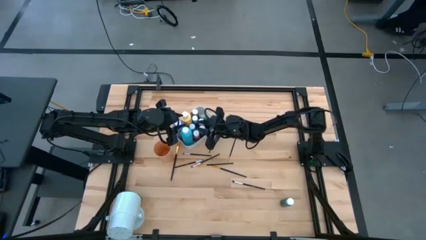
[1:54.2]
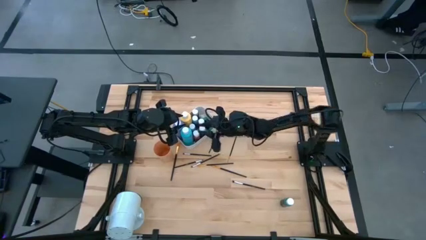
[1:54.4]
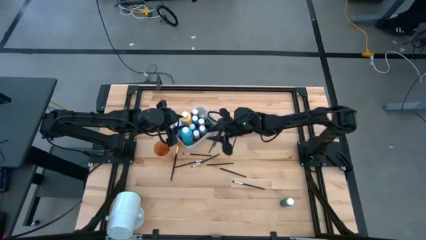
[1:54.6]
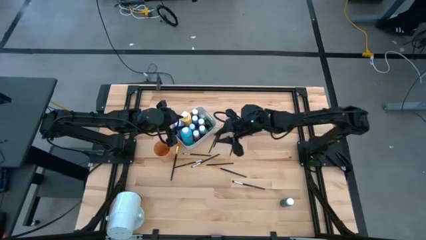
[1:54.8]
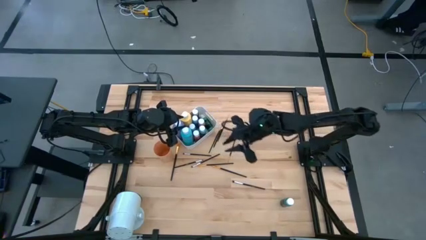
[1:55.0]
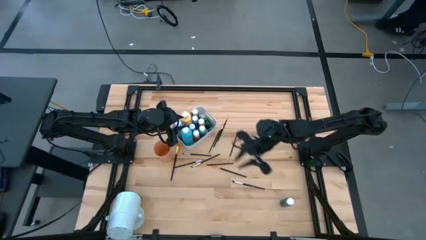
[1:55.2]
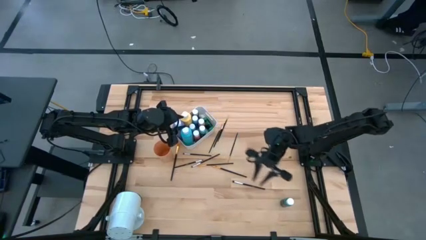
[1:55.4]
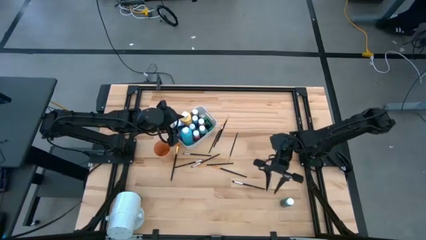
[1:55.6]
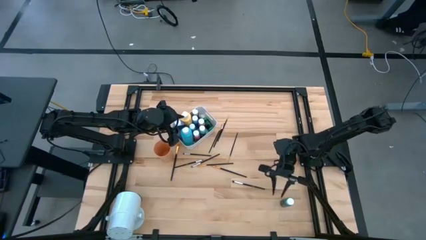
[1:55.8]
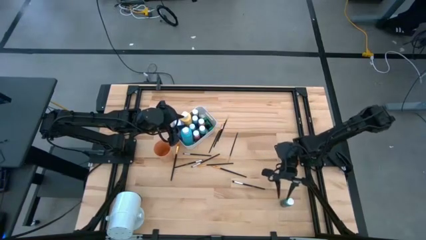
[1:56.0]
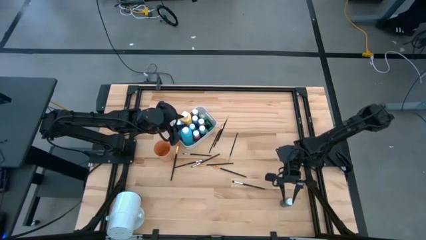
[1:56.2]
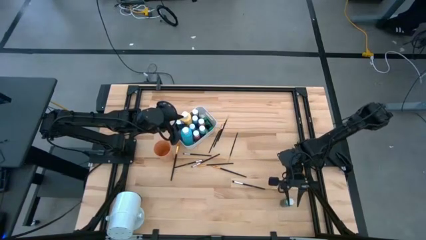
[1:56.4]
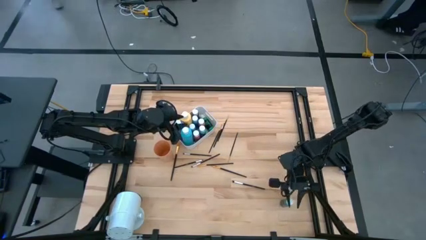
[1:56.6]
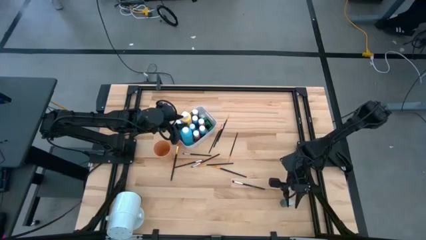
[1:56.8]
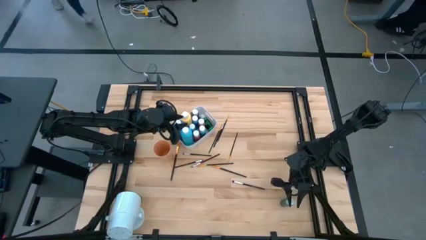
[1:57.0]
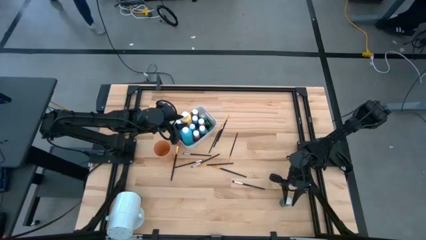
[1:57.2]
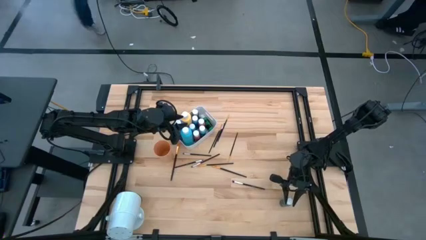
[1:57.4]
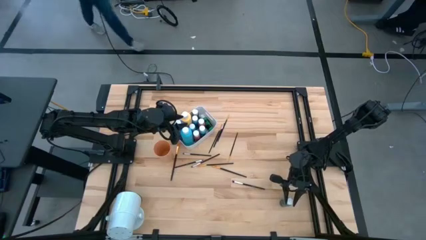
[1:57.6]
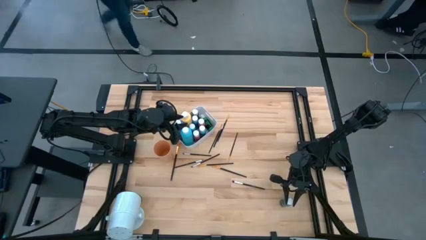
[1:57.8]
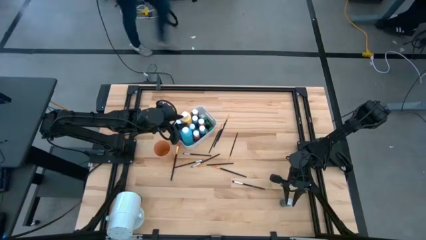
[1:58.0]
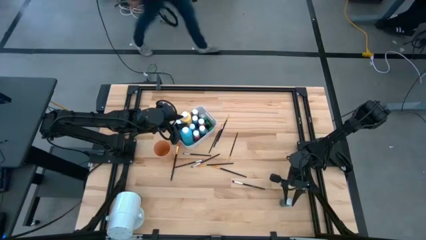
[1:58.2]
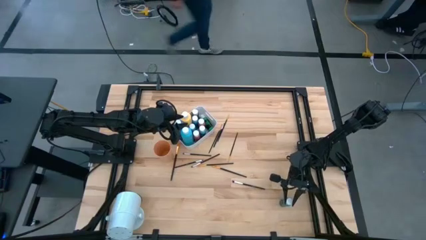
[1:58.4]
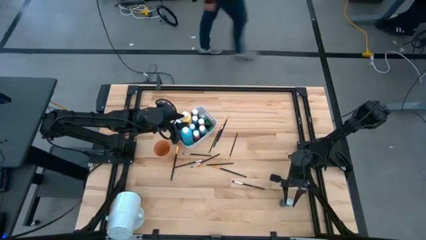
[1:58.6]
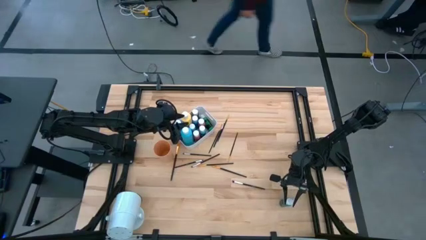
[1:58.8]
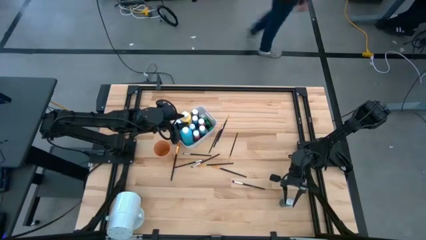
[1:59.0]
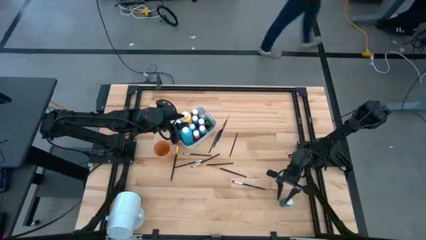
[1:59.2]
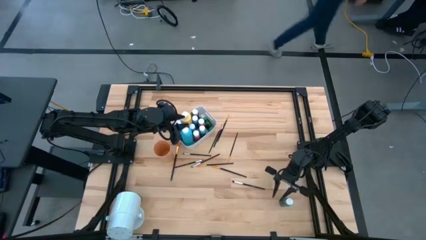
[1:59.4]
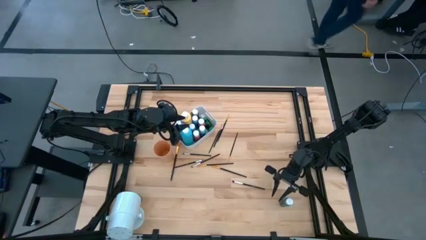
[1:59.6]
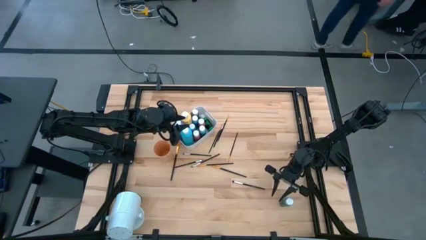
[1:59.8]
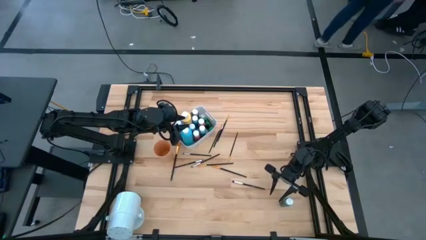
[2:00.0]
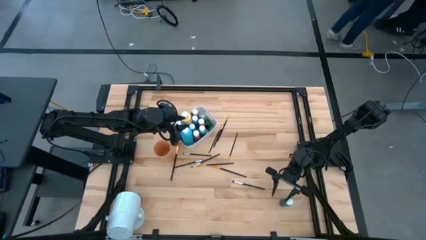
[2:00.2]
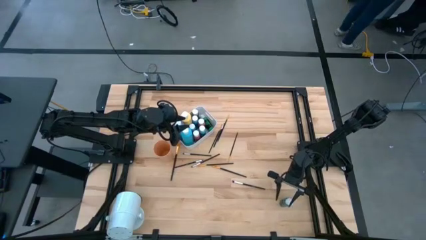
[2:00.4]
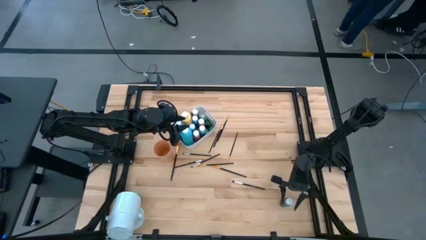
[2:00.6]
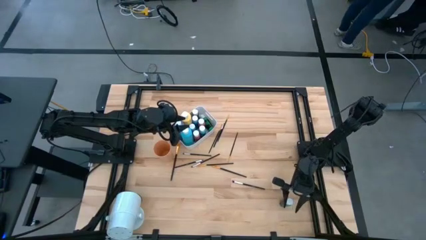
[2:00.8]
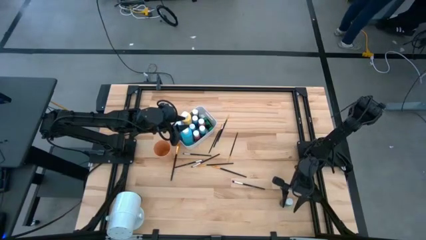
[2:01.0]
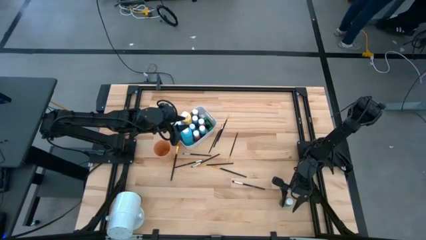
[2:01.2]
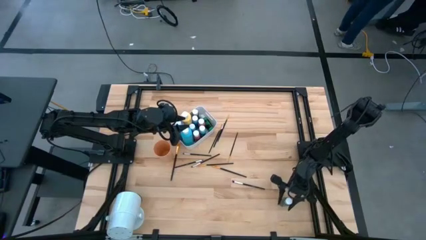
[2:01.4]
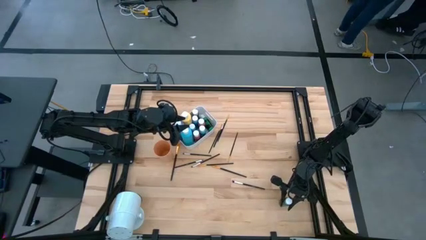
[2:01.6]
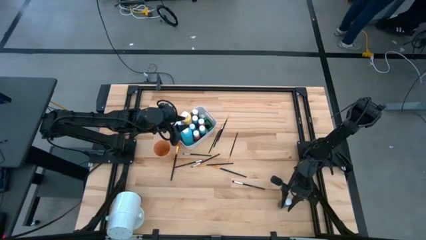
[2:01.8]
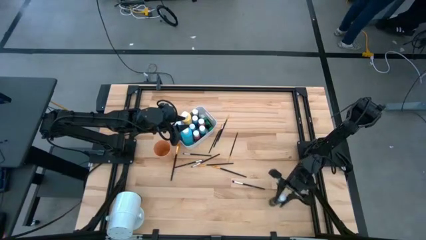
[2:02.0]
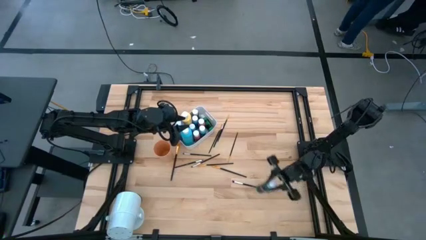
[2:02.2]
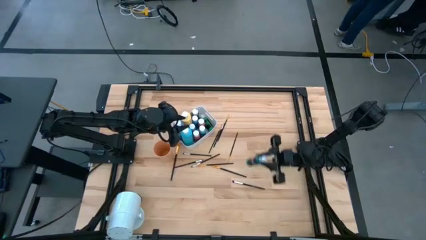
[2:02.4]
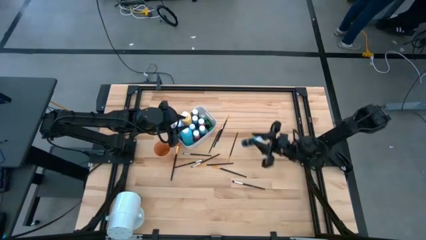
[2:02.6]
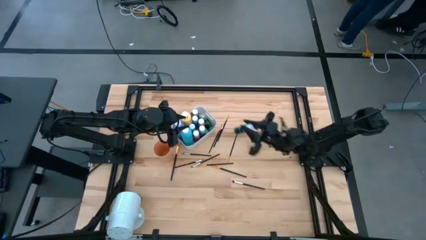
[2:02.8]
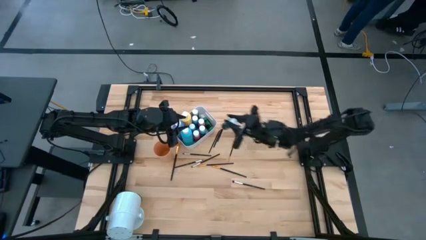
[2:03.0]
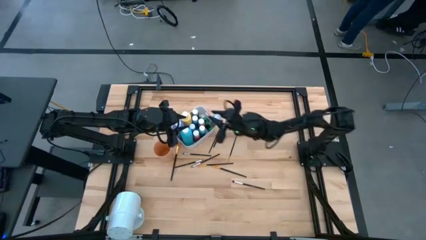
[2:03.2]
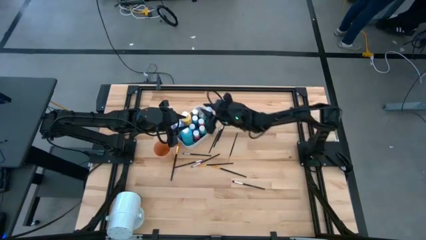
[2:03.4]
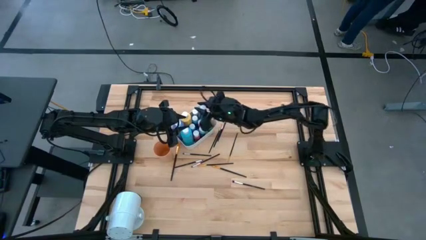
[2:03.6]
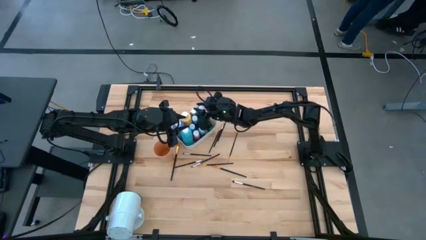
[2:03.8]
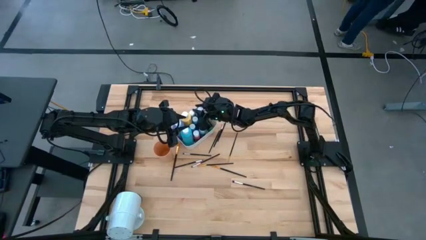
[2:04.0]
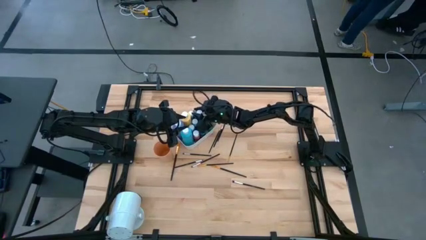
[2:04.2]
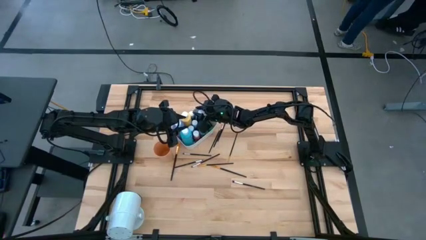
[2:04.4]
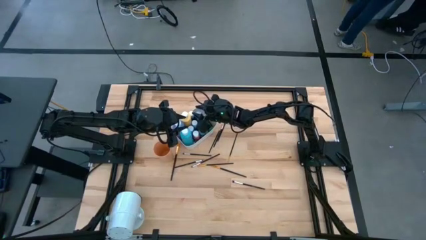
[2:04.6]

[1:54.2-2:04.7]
Task: Pick & Place Paint Supplies
Put the small light blue paint bottle into the white bin

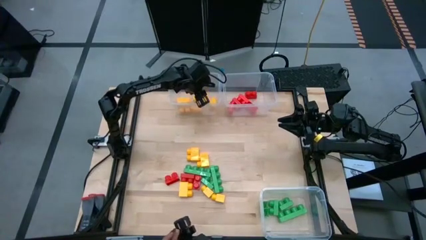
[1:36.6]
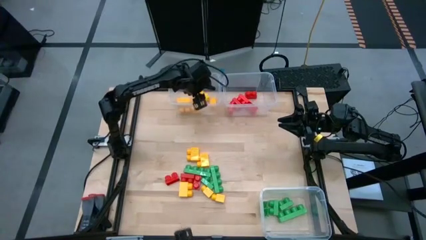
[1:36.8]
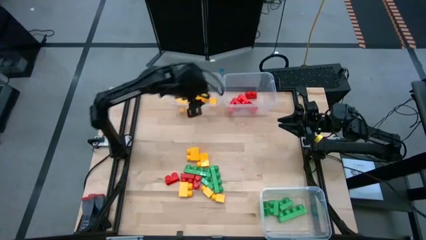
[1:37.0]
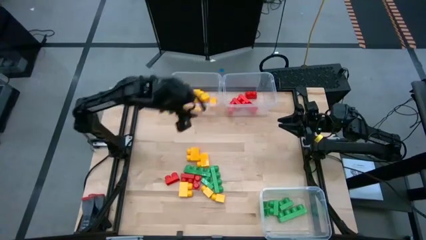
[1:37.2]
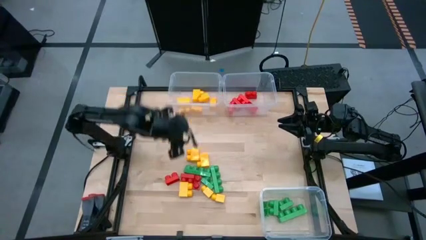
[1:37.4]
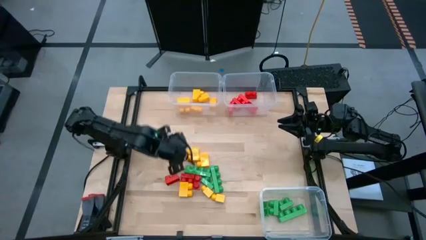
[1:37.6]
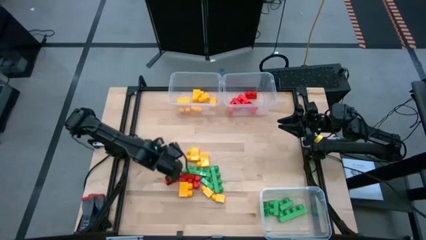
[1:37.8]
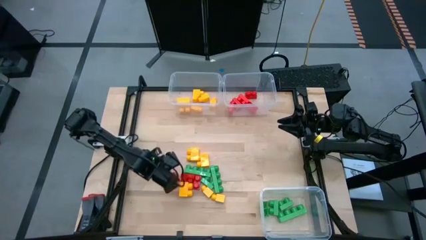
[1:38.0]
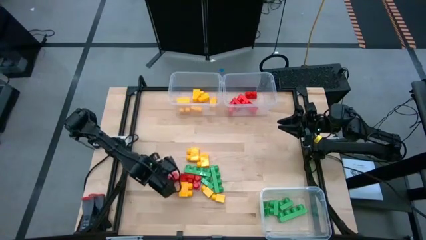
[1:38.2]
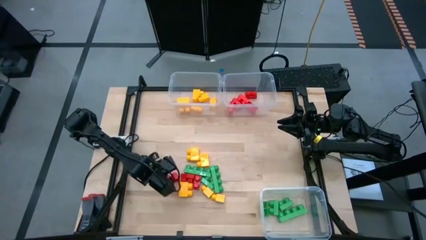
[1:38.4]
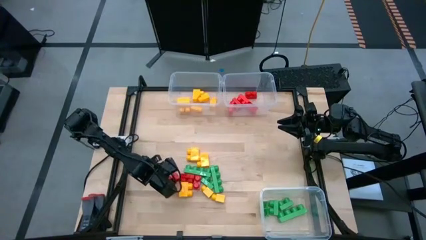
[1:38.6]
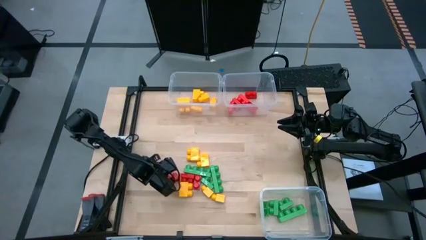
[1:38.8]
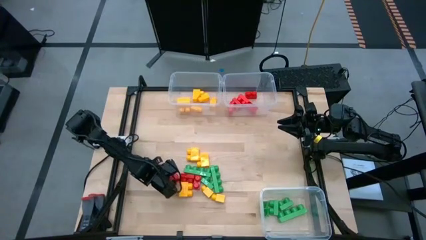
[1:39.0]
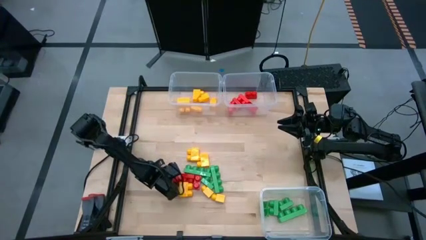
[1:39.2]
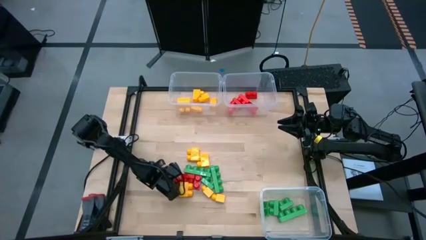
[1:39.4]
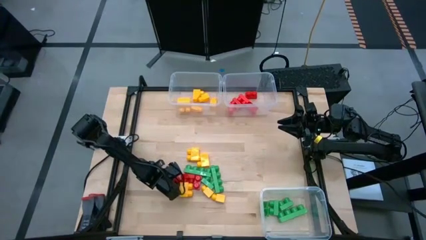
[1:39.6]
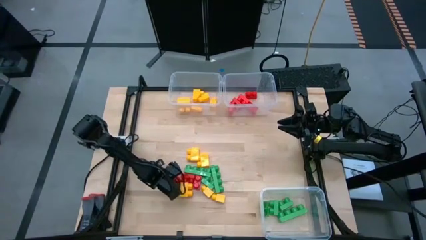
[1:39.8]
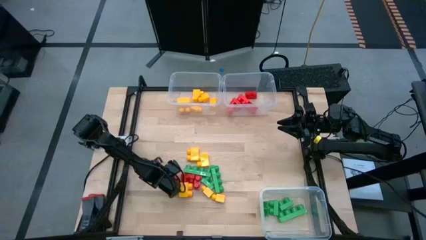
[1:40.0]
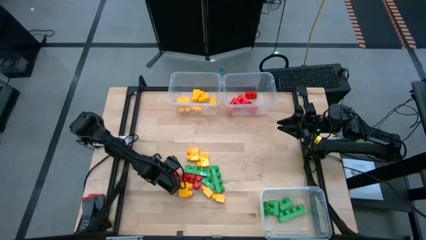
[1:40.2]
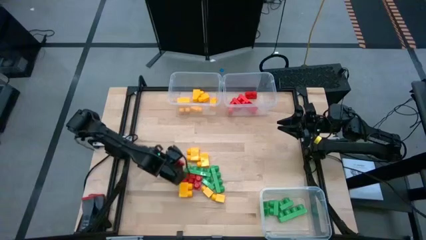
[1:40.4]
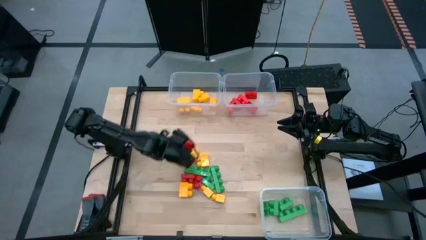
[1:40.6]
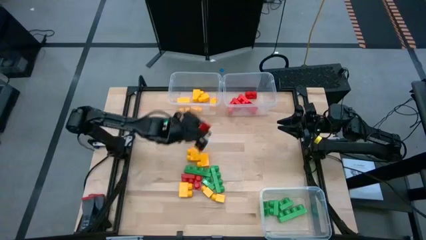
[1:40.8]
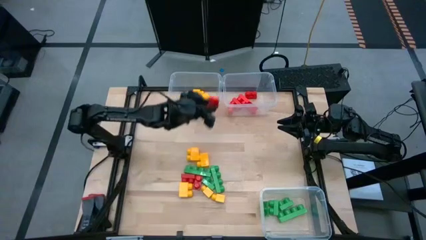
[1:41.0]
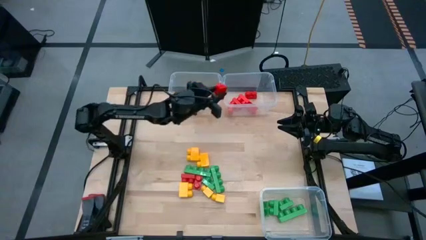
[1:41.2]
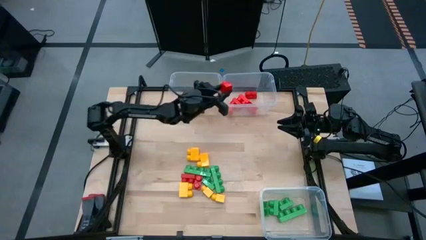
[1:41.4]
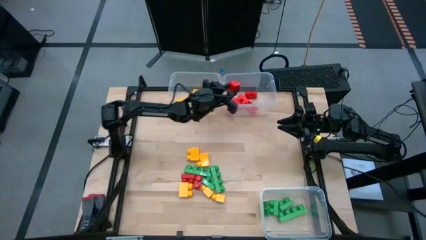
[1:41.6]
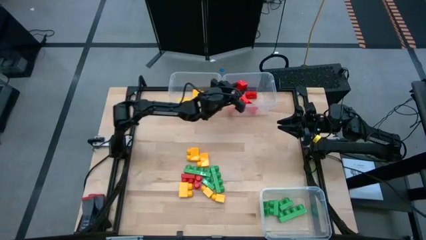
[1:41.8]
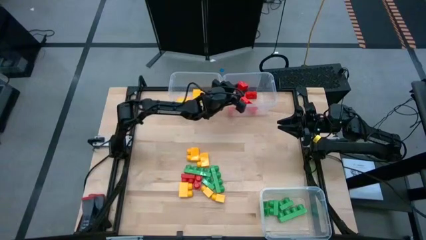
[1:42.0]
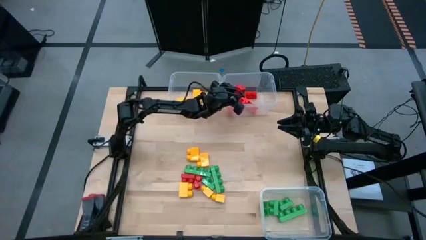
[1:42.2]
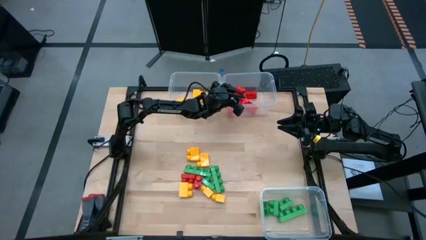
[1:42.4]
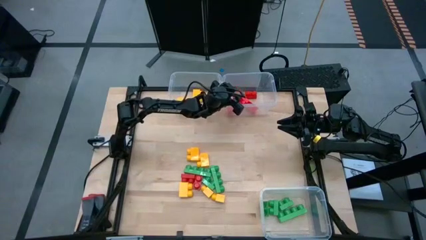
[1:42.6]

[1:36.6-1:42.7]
Task: Sort blocks
Put the red game piece into the top right transparent bin
